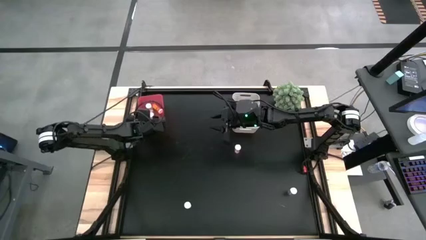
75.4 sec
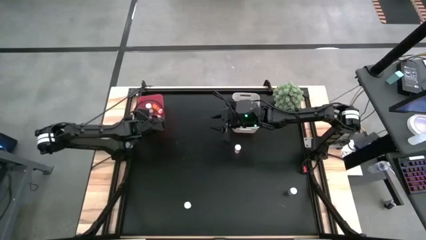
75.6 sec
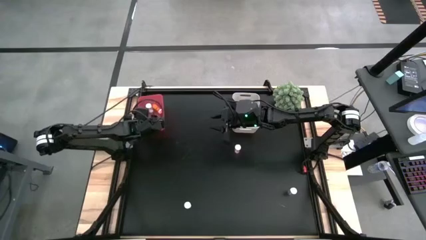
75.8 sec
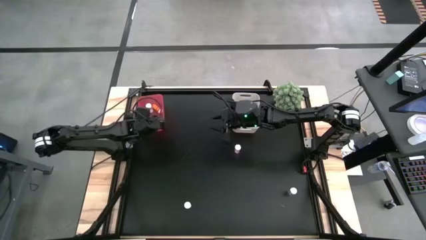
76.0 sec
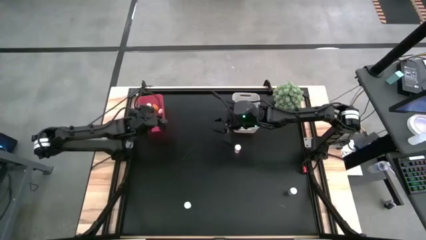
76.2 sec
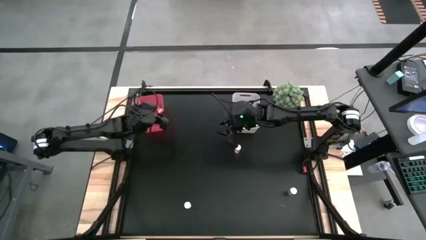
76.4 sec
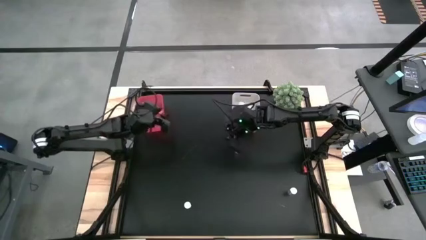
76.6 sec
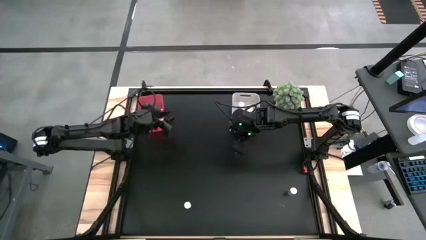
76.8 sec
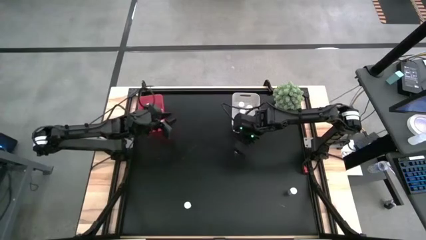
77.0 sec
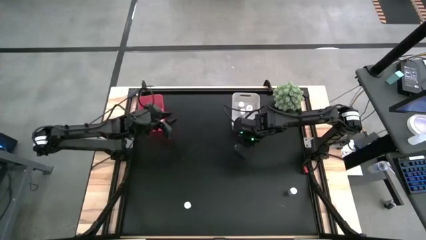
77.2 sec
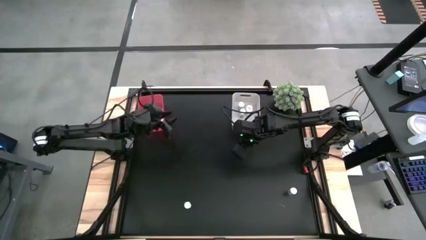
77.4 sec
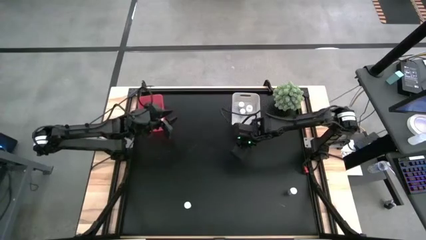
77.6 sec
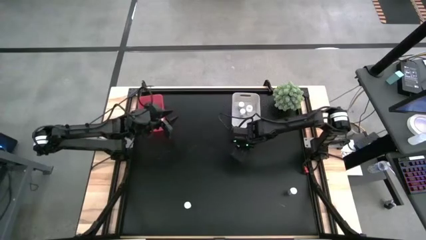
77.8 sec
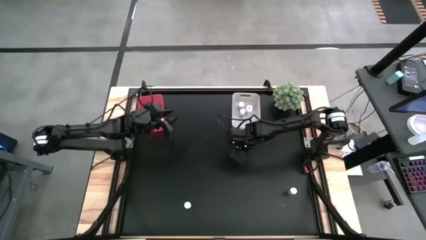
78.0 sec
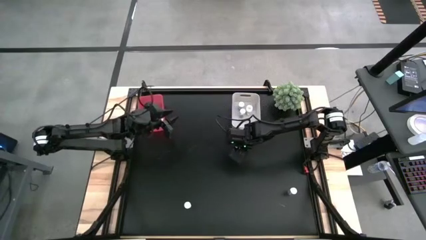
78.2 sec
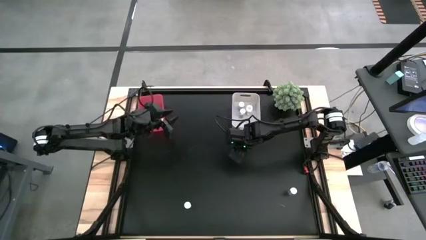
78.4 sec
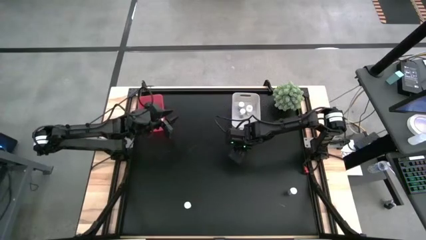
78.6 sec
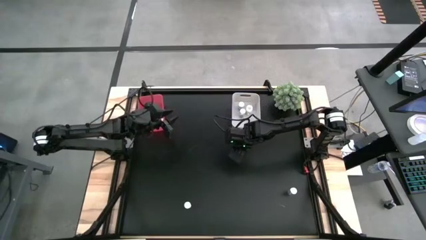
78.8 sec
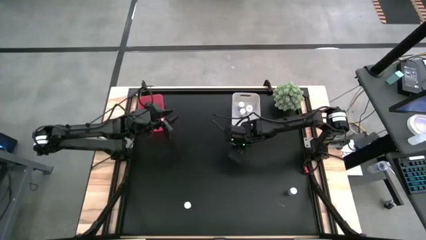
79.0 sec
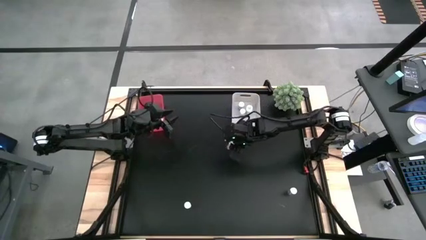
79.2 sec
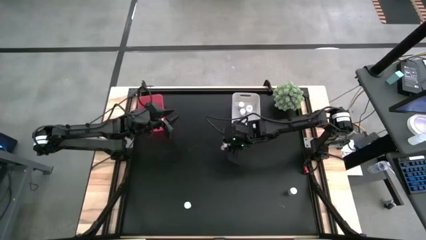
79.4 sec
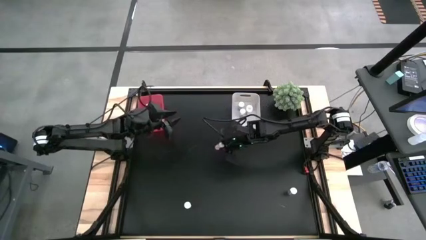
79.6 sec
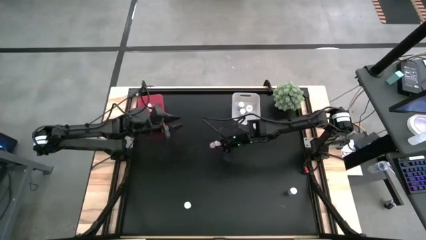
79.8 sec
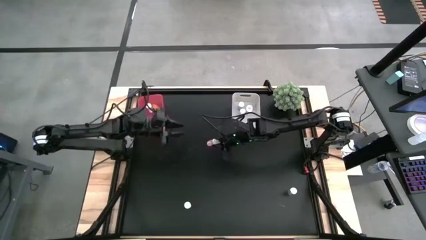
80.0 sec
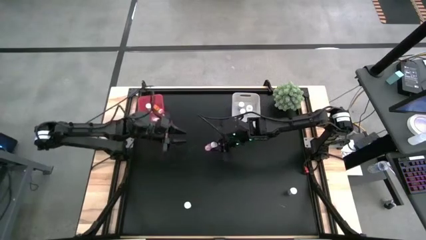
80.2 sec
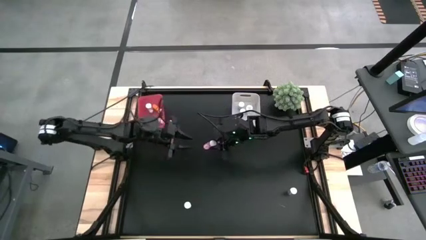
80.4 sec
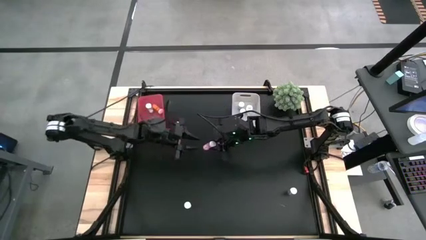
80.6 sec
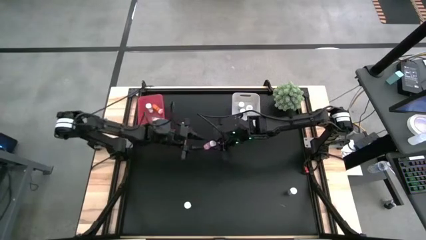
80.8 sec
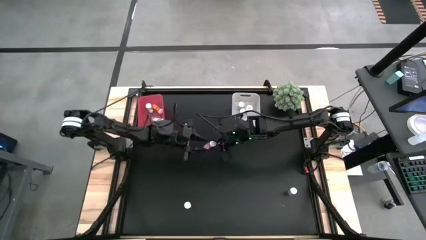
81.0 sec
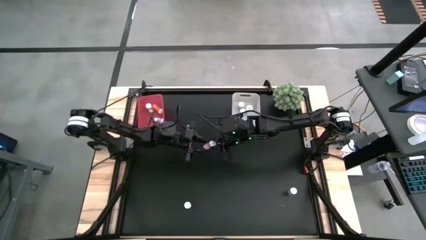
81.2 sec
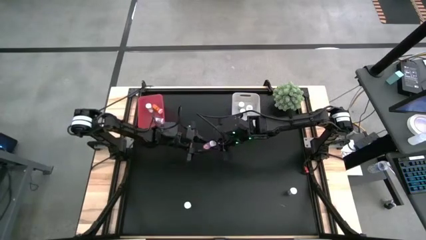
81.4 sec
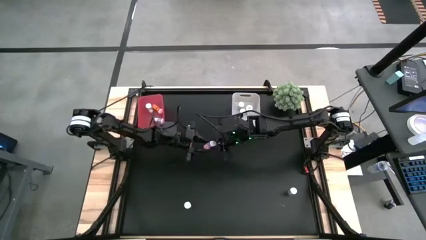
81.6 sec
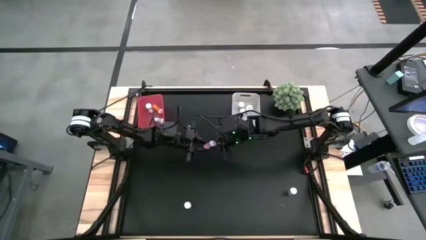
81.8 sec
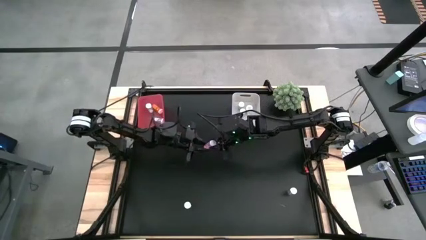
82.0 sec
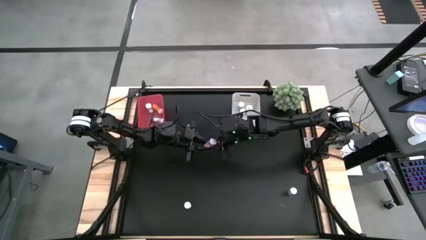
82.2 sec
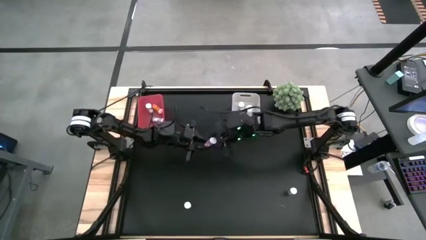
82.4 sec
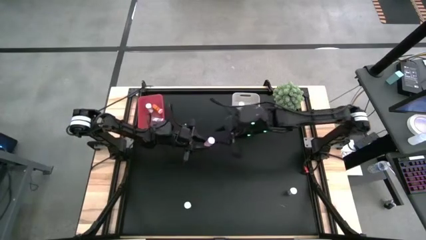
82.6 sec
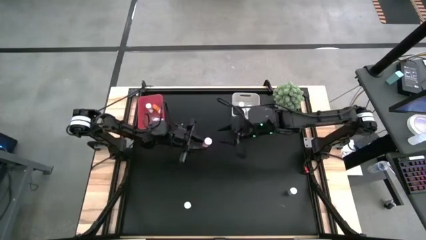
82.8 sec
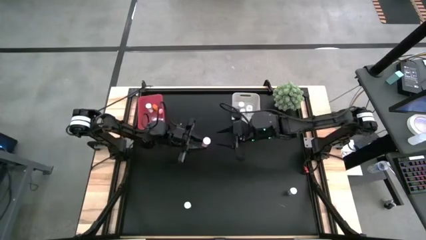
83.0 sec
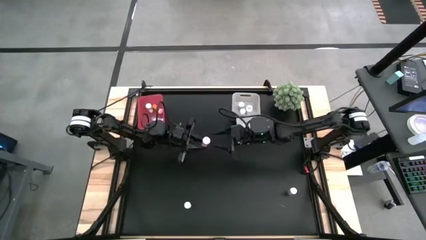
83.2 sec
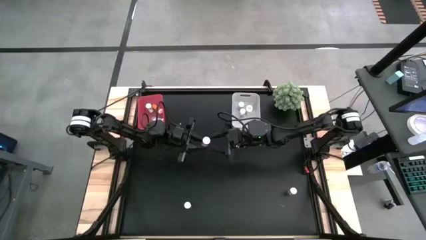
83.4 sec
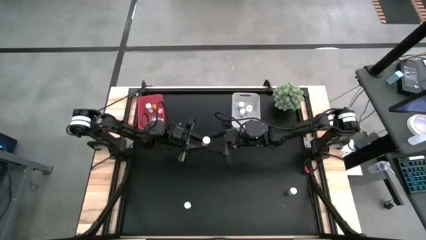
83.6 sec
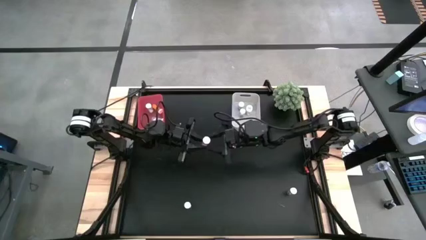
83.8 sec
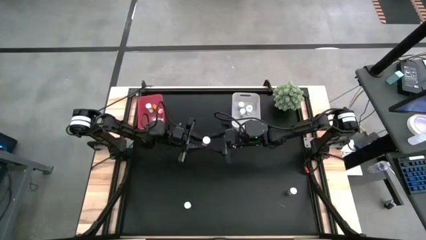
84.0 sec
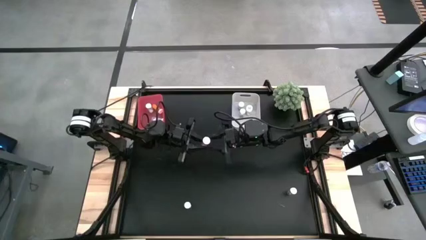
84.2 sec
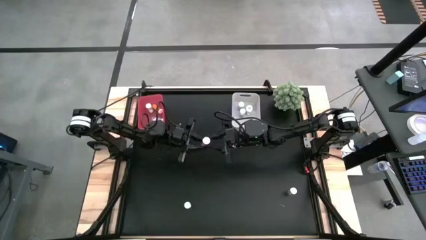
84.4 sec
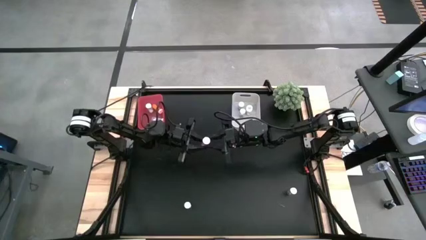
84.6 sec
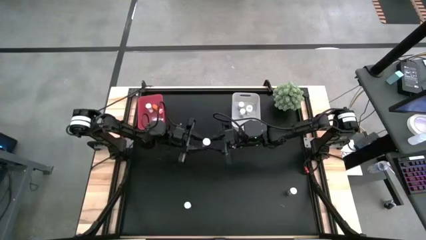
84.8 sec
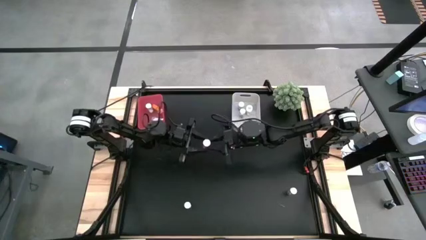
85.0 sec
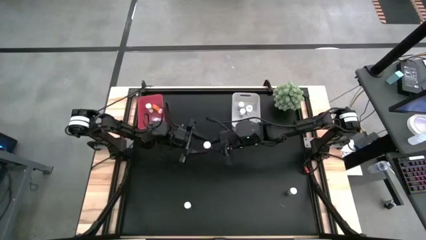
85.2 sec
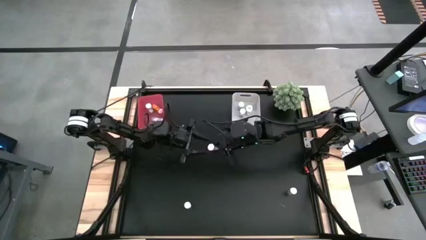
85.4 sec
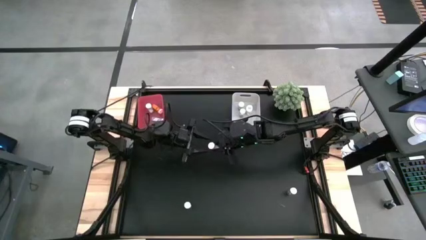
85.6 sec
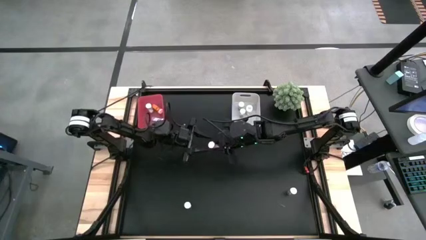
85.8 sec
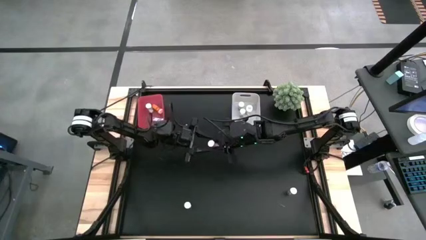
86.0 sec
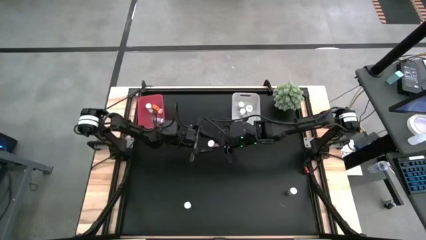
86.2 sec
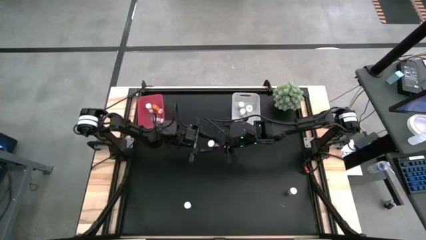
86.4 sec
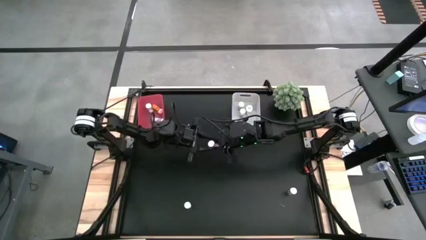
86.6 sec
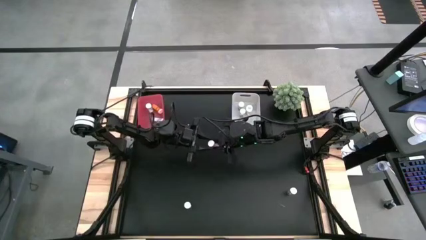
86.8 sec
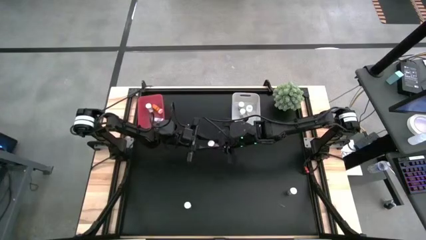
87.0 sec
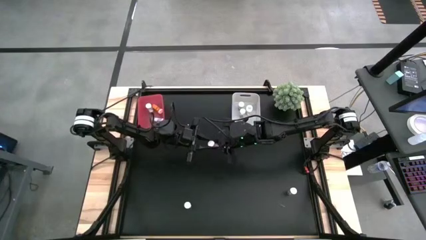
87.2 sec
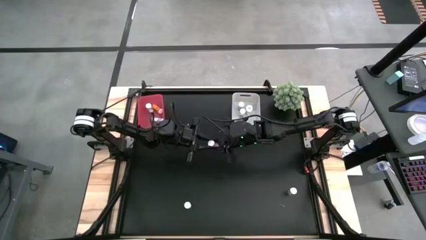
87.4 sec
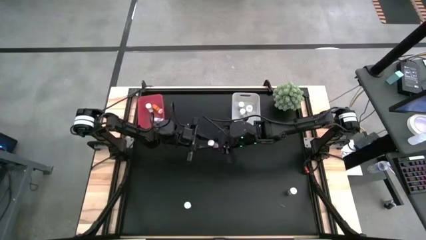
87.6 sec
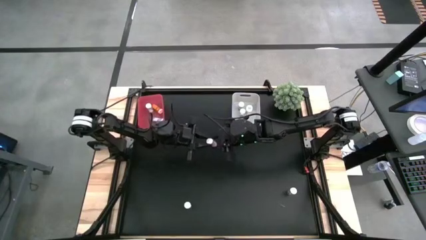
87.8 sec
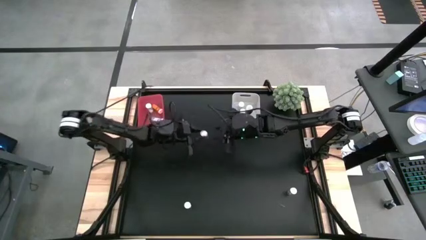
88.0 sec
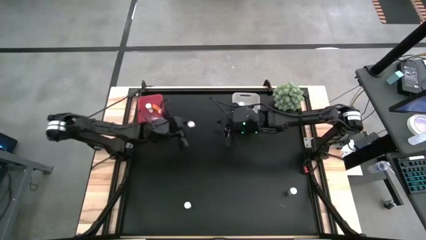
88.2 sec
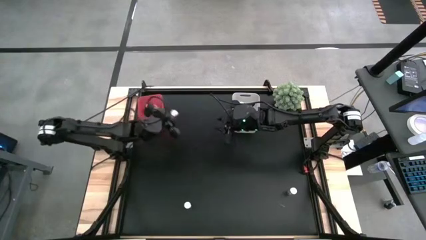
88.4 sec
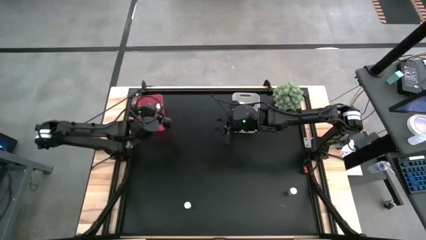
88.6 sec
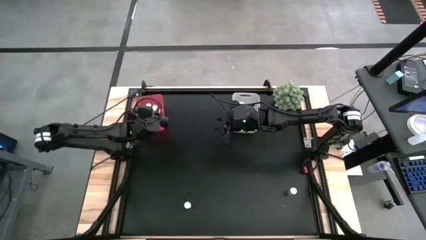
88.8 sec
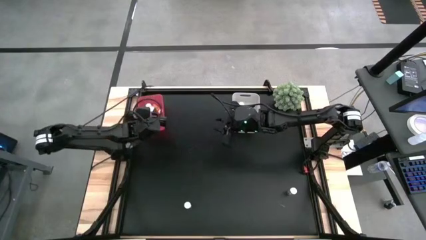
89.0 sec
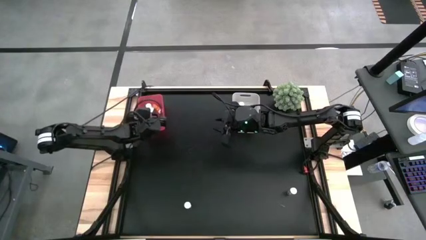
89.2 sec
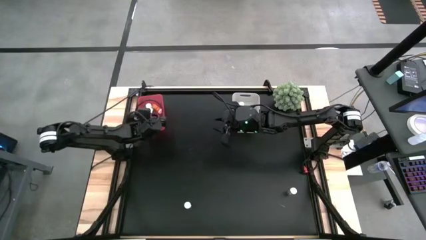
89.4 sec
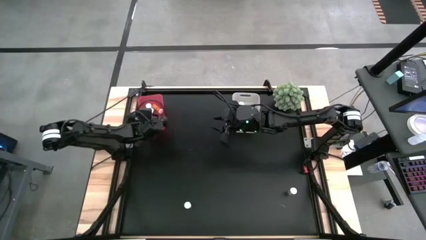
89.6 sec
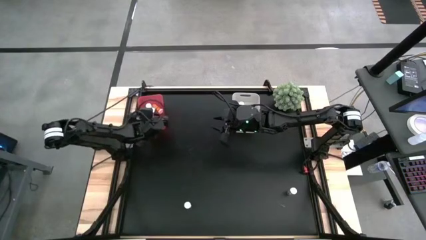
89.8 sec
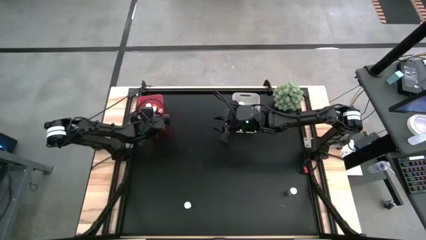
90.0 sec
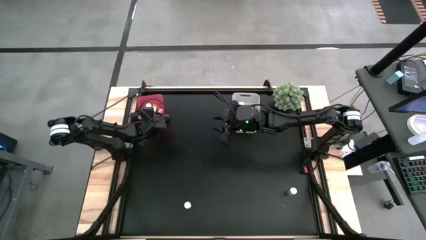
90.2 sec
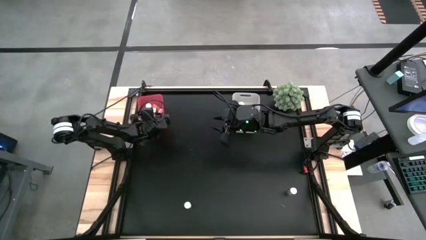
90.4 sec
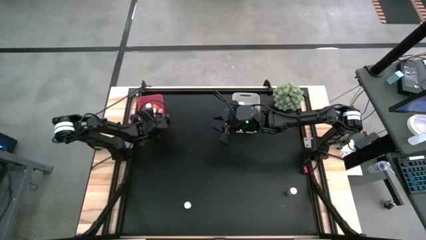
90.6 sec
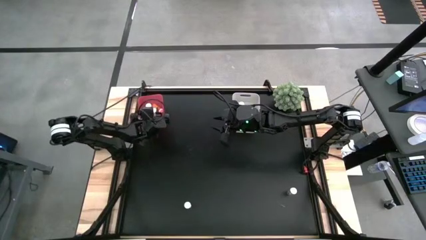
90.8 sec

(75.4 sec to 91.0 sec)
Task: Pick and place medicine bottles into bin by pill shape (circle, oval)
Put pink tablet bottle into the red bin
